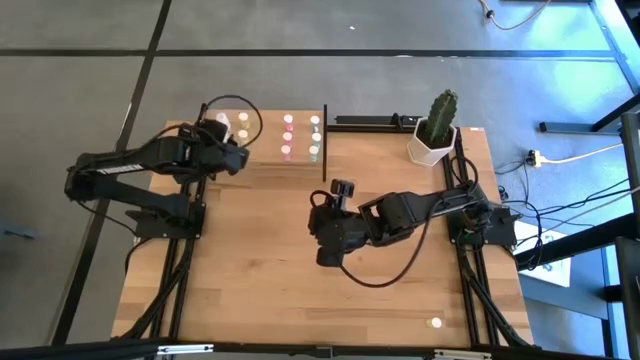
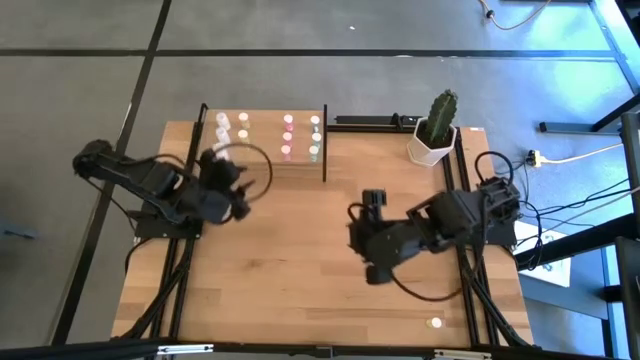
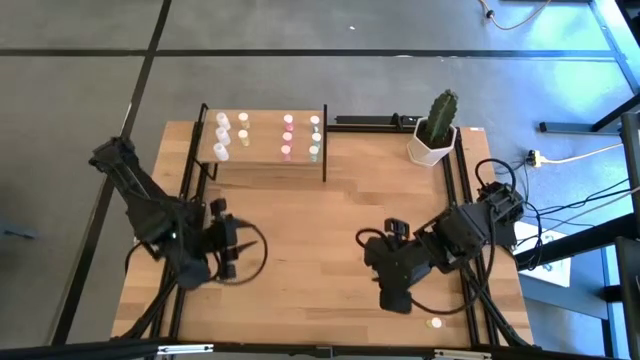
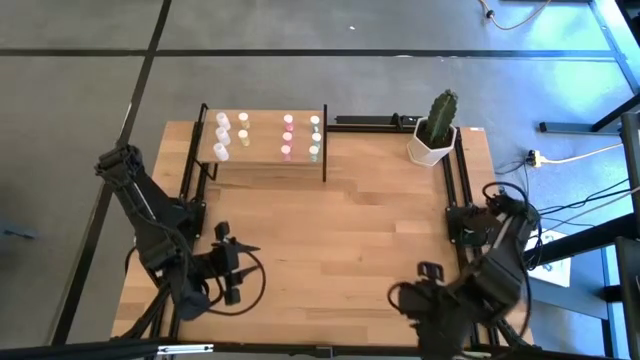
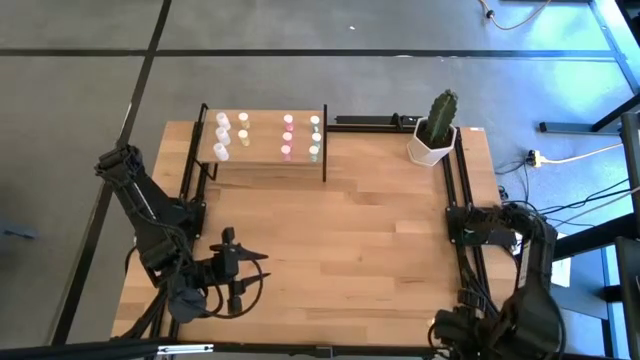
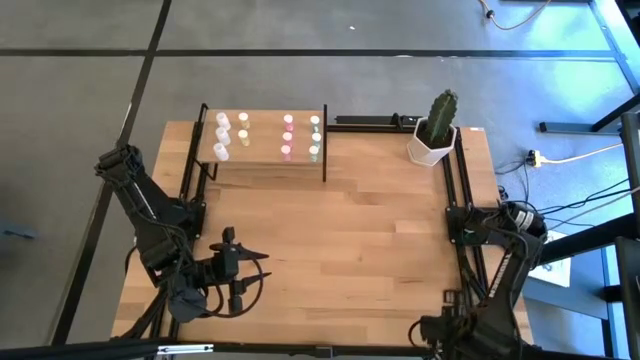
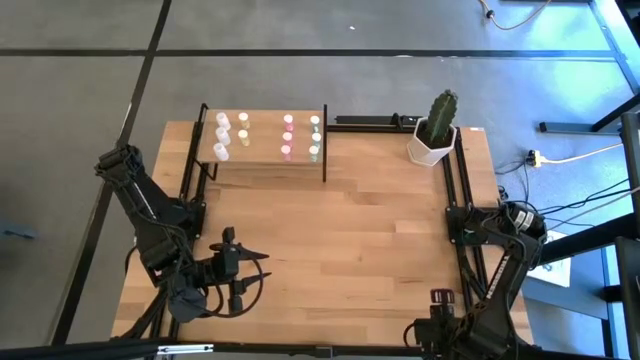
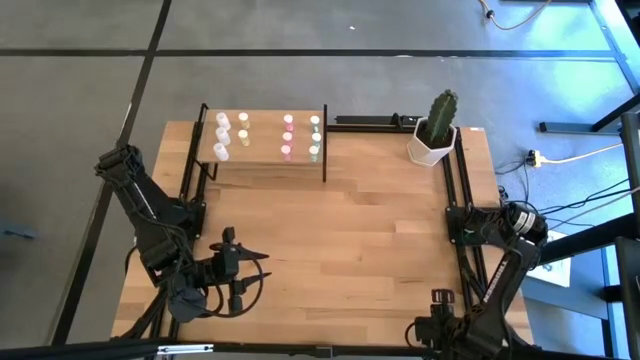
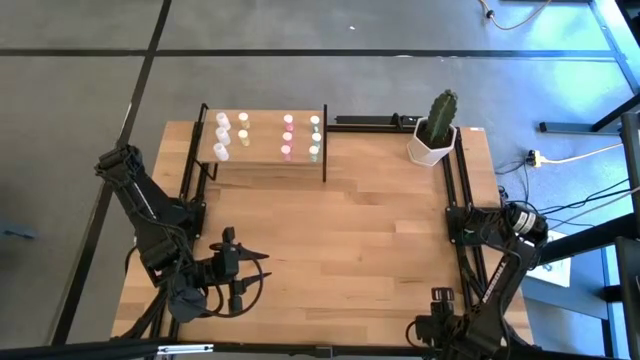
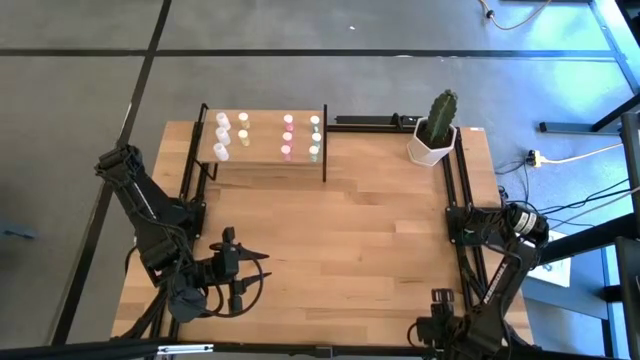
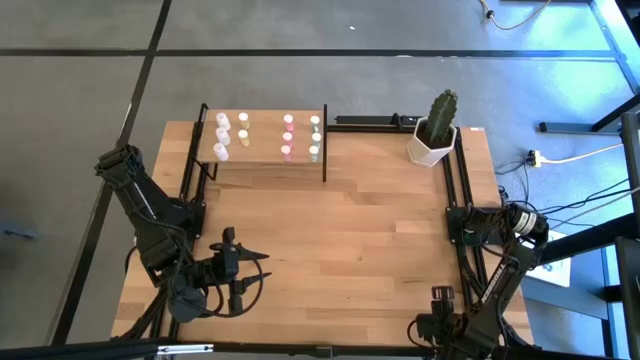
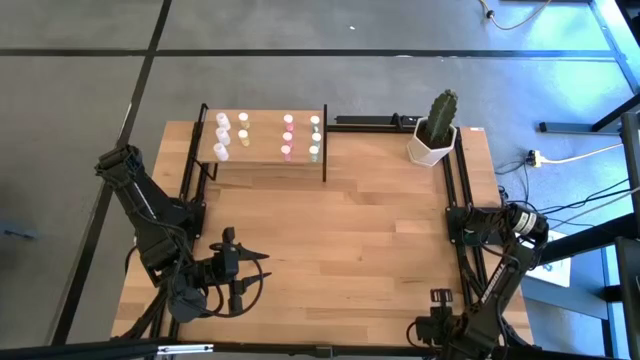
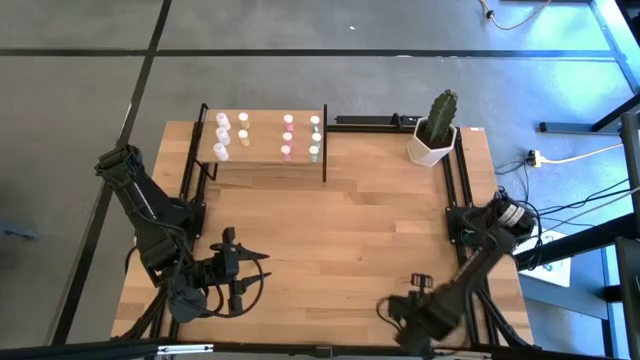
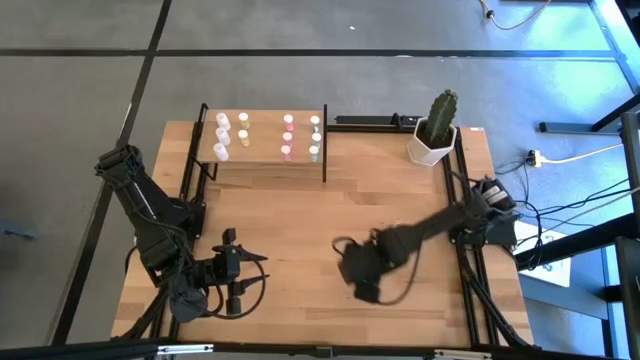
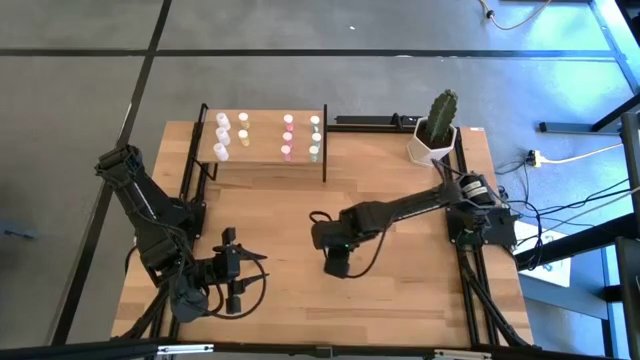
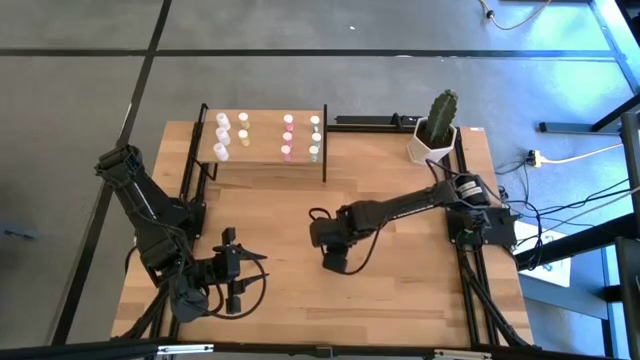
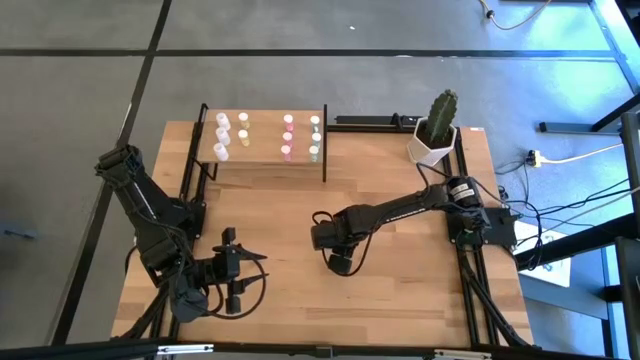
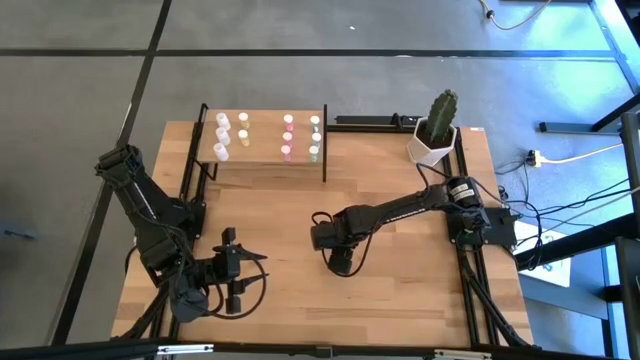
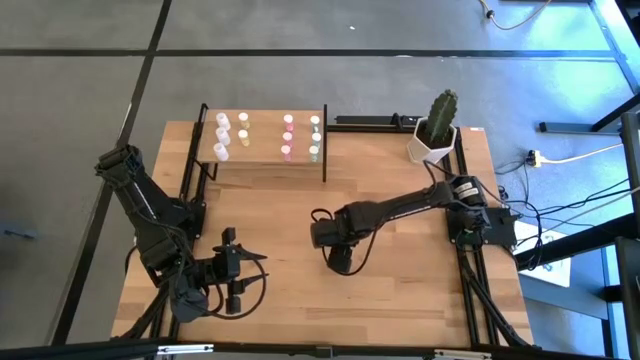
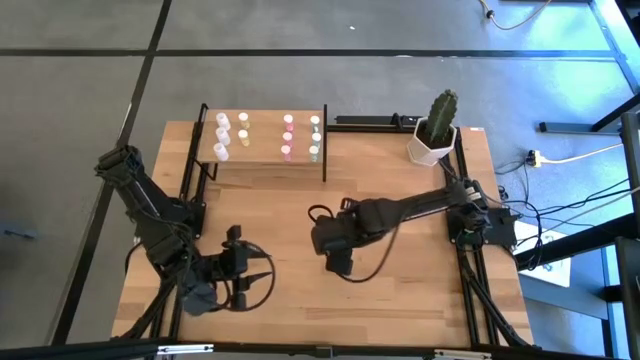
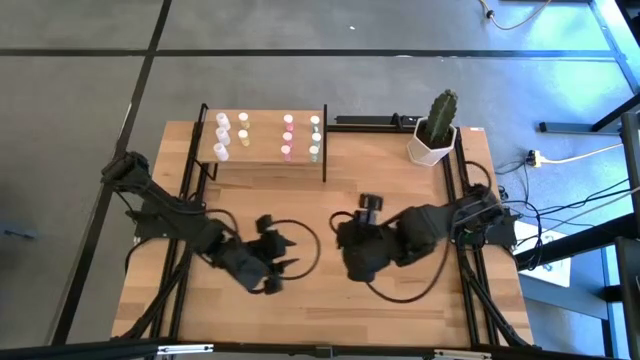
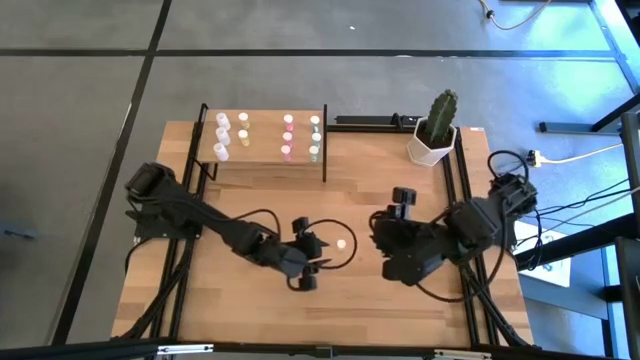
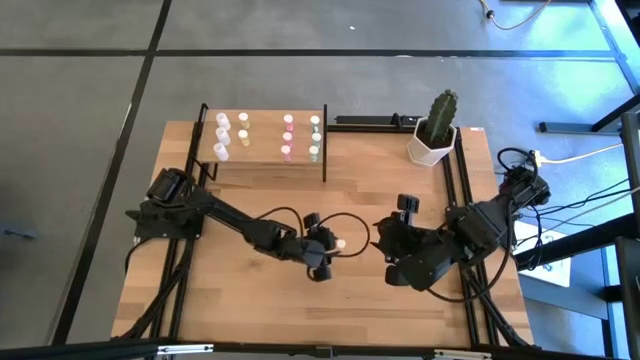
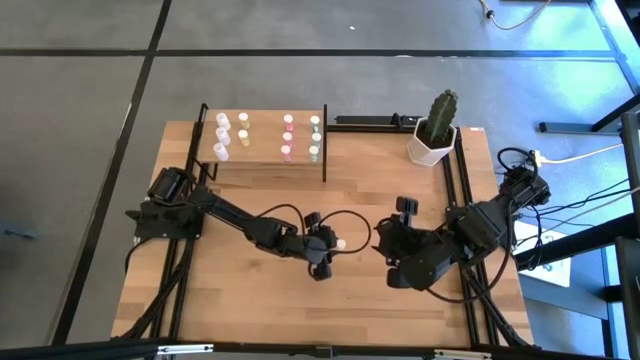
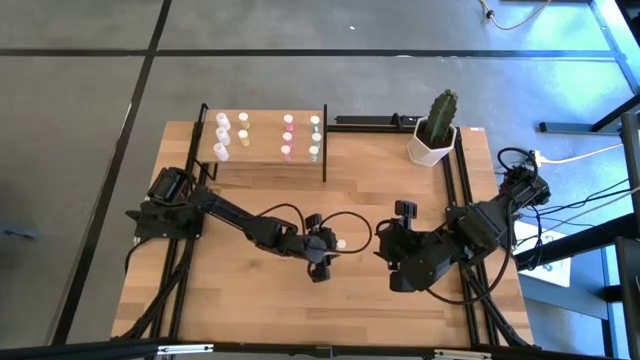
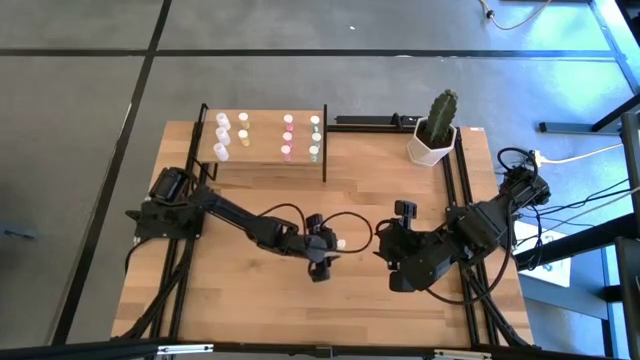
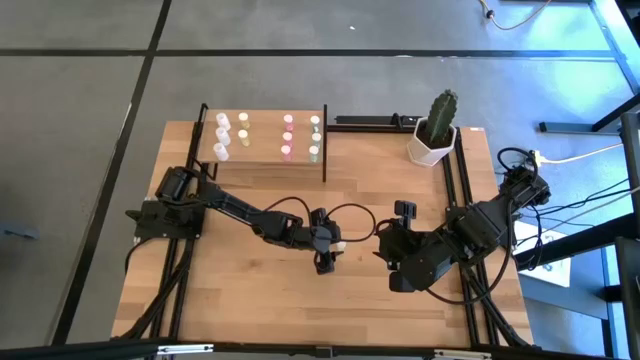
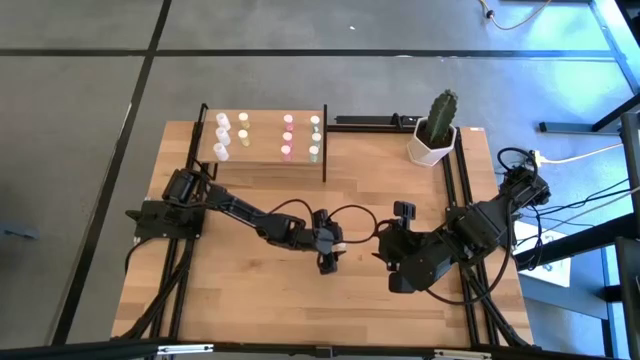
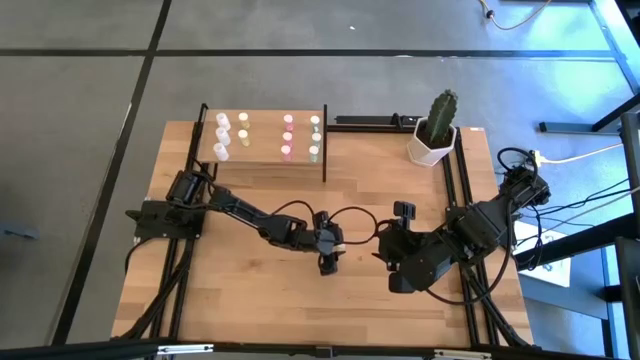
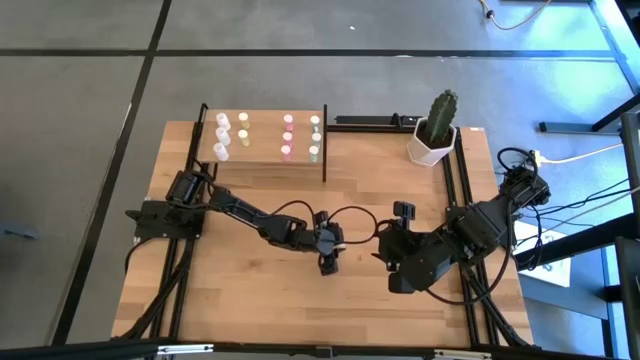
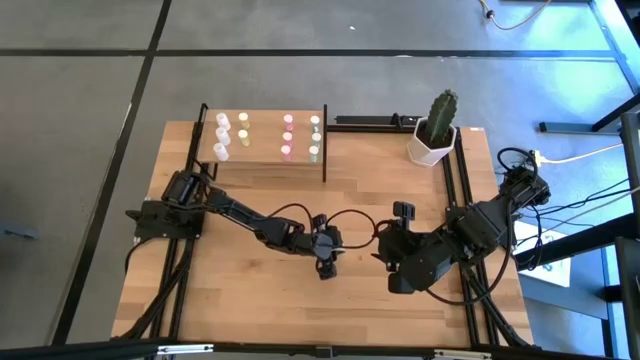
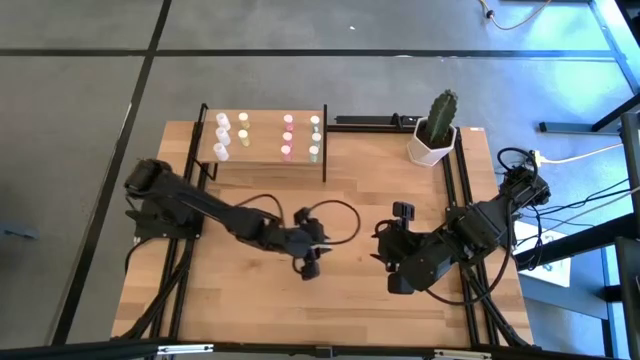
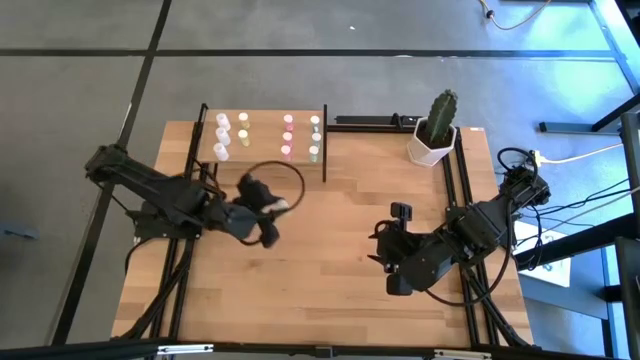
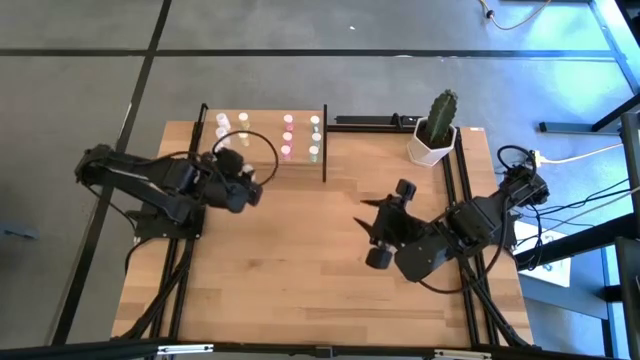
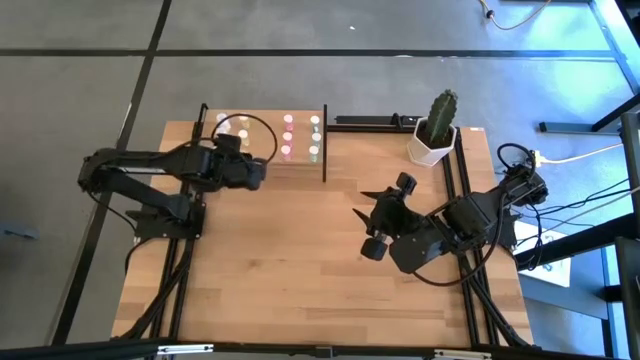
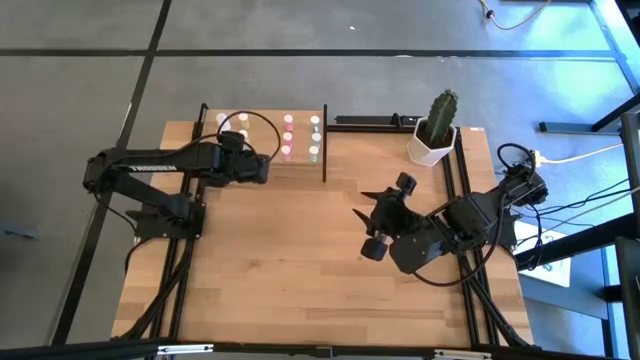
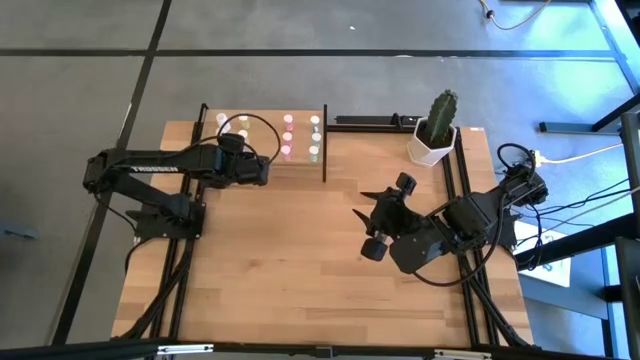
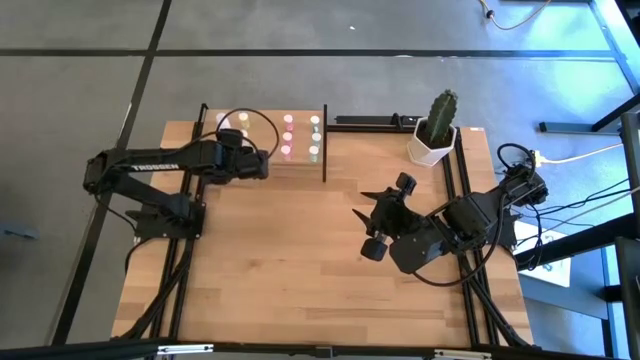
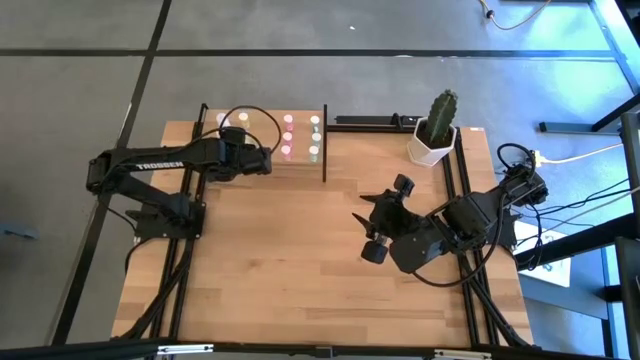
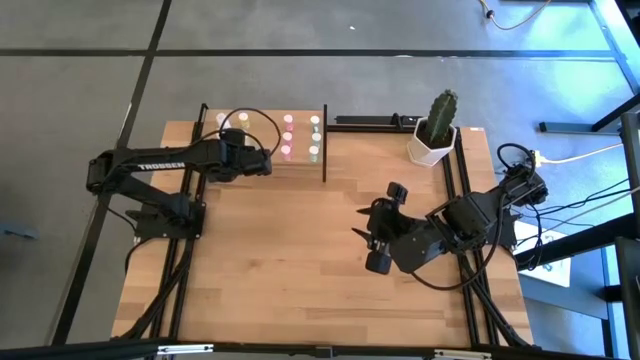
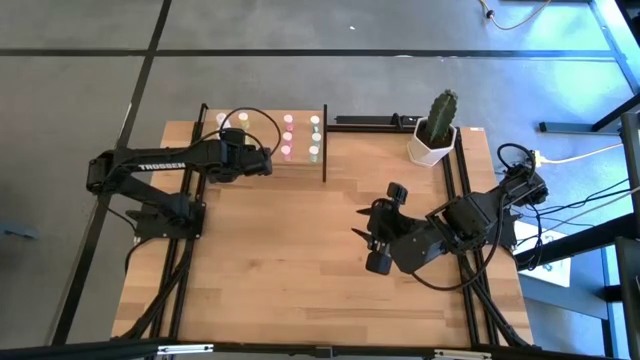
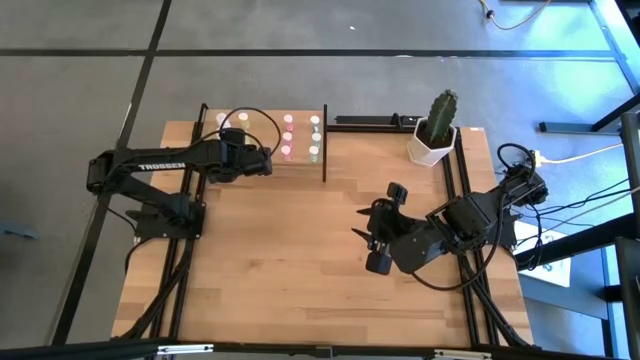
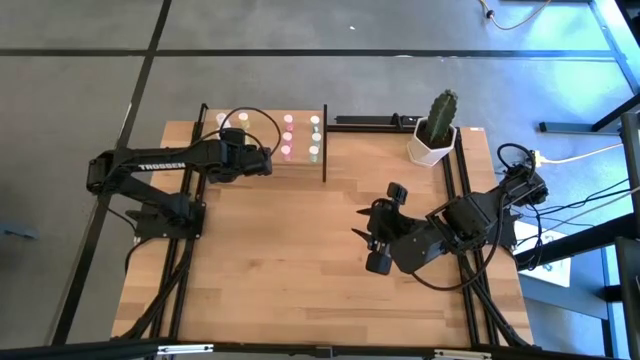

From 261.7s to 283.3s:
Task: Pick and place medicine bottles onto shelf by color
Put the yellow pill bottle on the shelf and align it with the other yellow pill bottles
